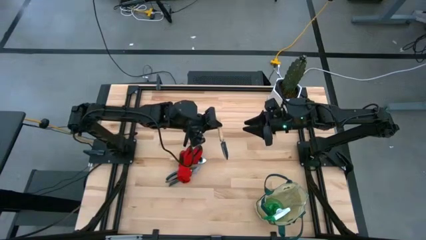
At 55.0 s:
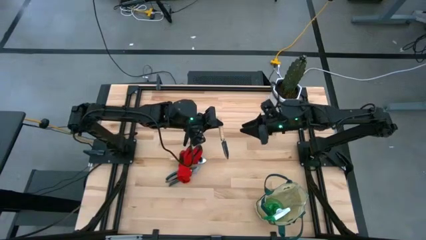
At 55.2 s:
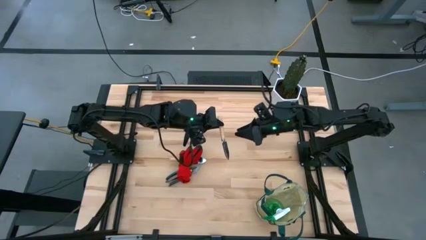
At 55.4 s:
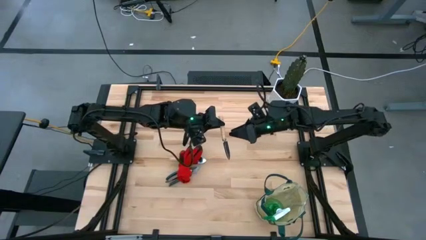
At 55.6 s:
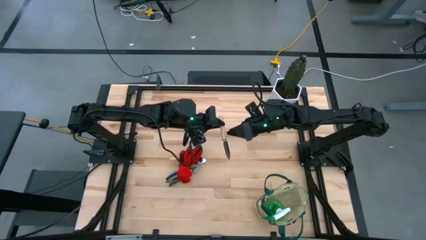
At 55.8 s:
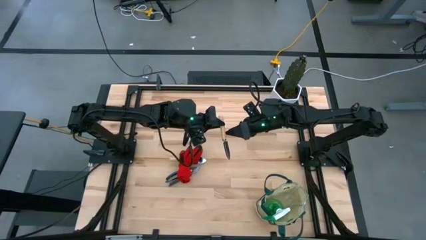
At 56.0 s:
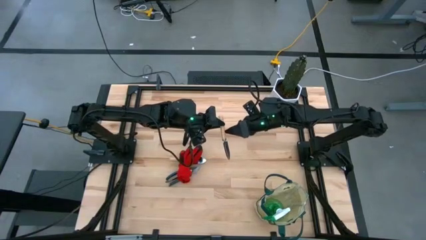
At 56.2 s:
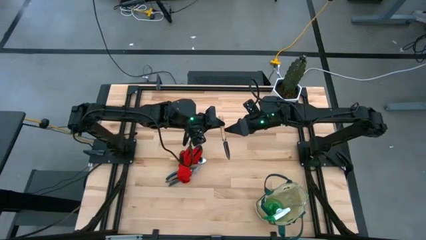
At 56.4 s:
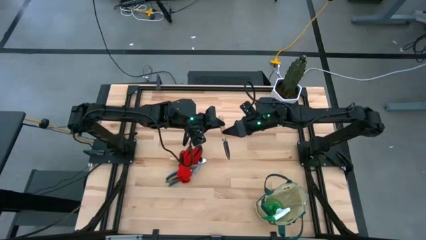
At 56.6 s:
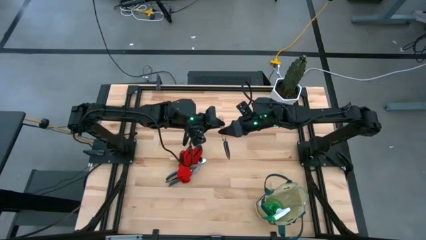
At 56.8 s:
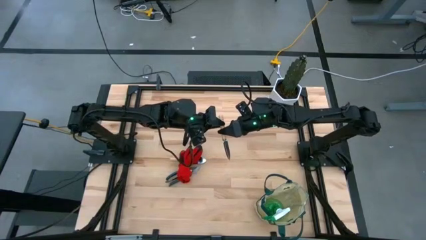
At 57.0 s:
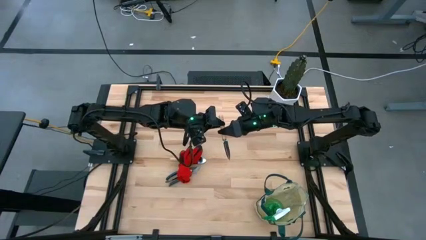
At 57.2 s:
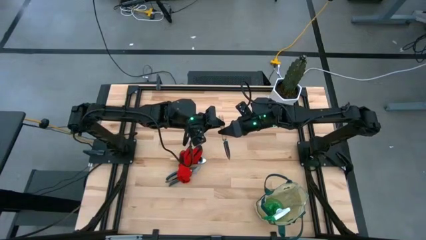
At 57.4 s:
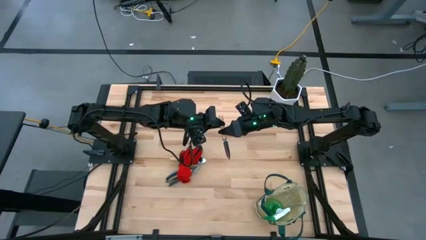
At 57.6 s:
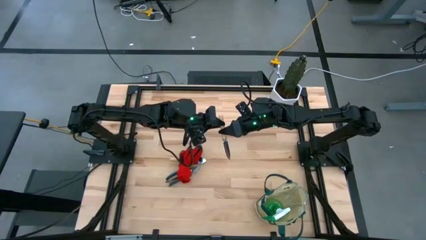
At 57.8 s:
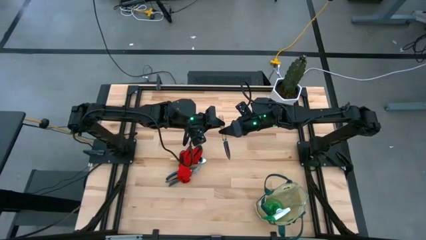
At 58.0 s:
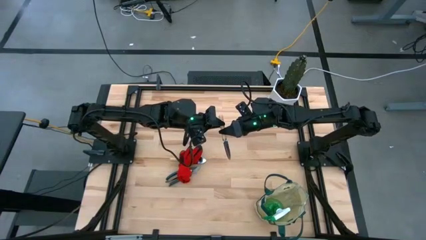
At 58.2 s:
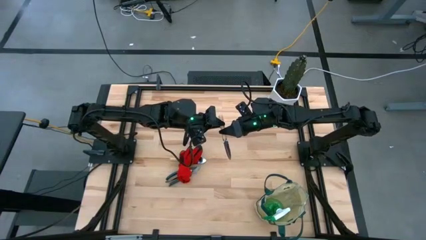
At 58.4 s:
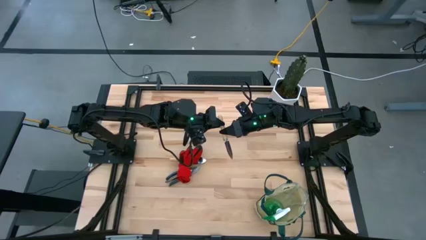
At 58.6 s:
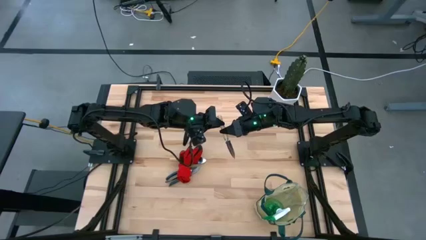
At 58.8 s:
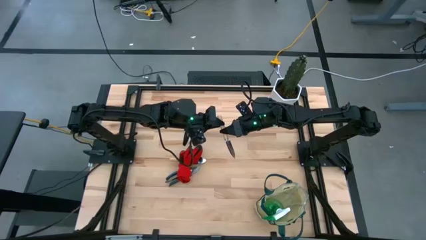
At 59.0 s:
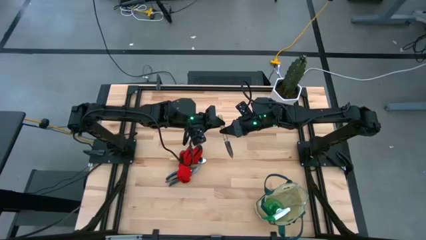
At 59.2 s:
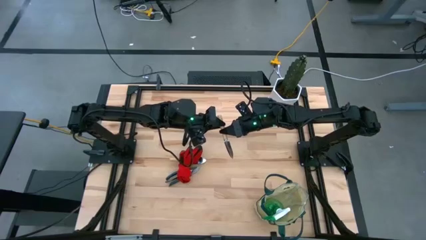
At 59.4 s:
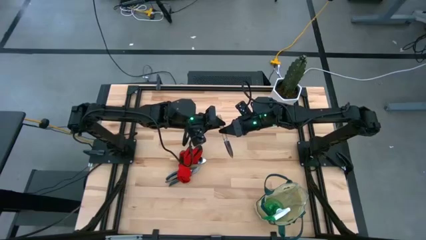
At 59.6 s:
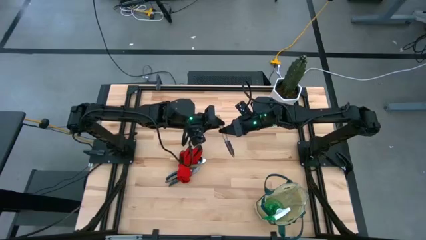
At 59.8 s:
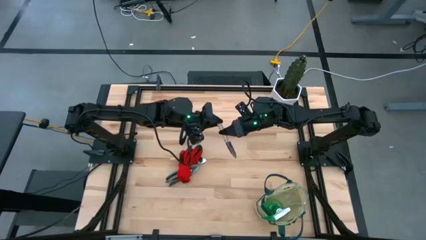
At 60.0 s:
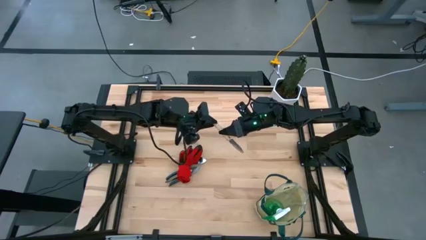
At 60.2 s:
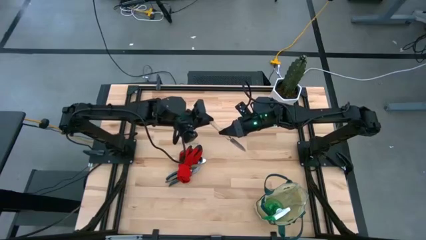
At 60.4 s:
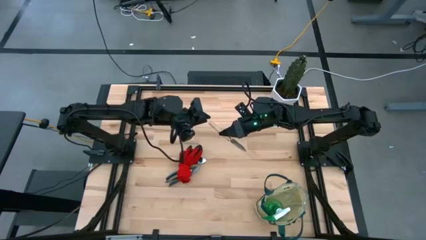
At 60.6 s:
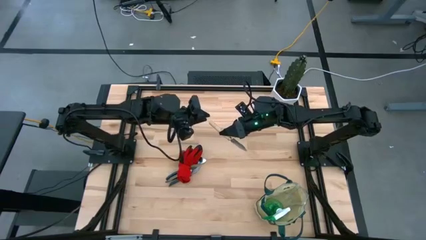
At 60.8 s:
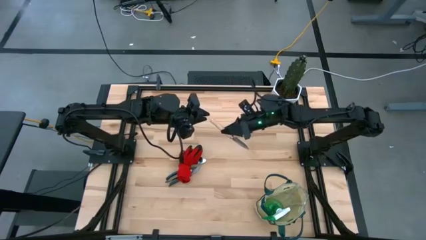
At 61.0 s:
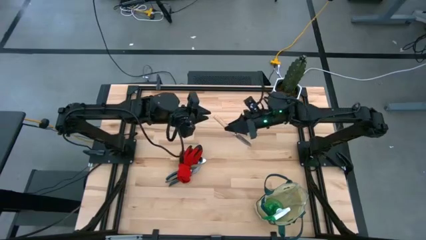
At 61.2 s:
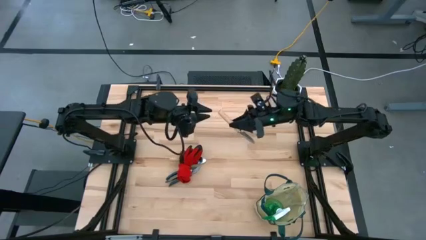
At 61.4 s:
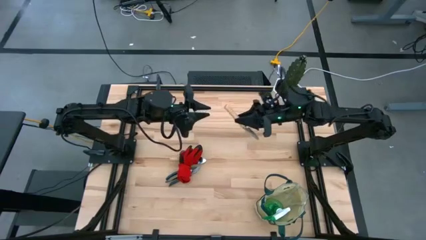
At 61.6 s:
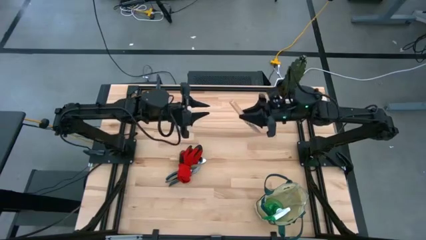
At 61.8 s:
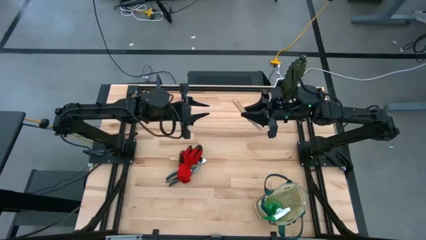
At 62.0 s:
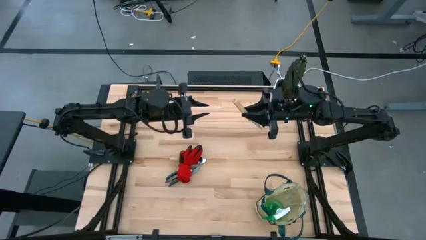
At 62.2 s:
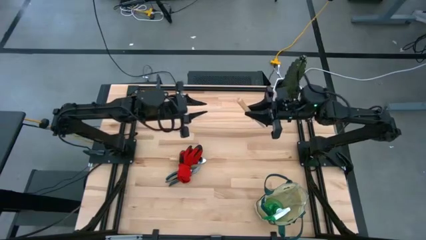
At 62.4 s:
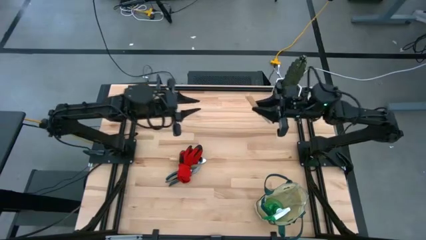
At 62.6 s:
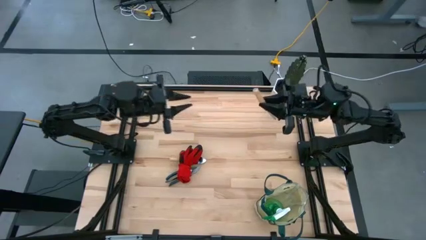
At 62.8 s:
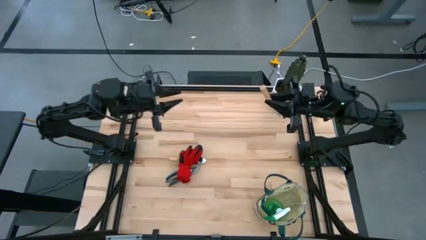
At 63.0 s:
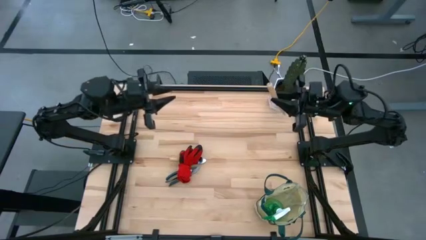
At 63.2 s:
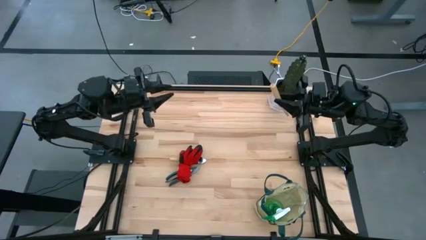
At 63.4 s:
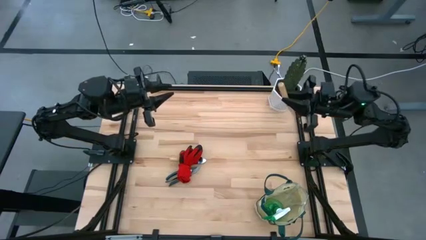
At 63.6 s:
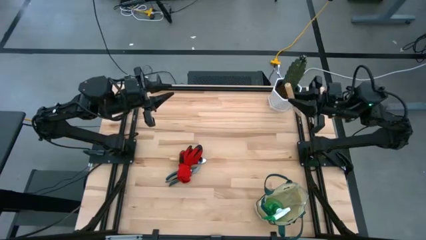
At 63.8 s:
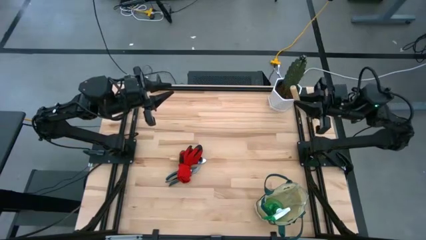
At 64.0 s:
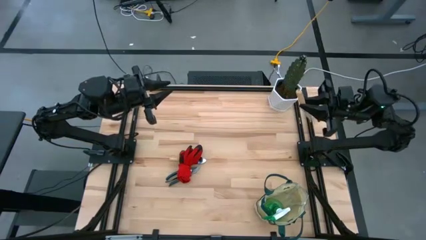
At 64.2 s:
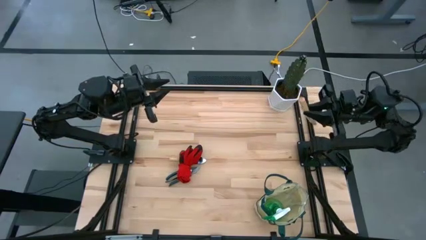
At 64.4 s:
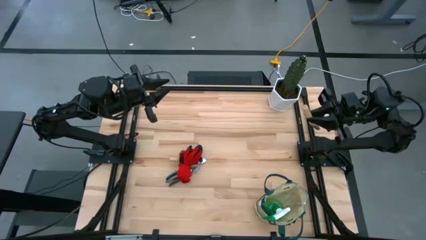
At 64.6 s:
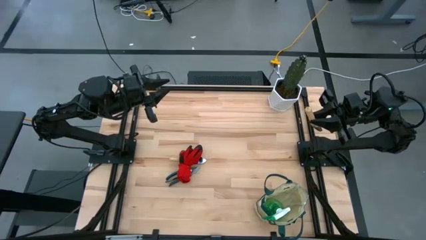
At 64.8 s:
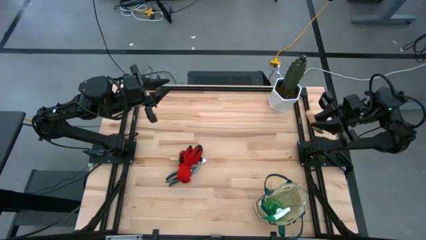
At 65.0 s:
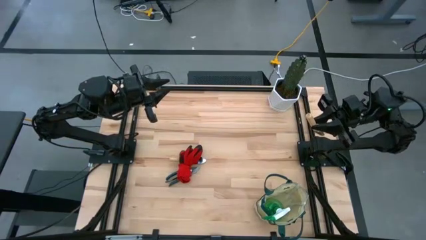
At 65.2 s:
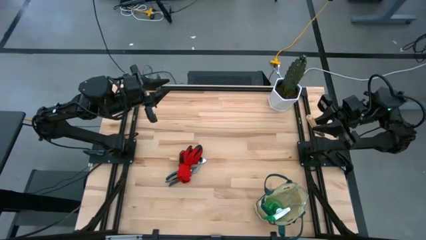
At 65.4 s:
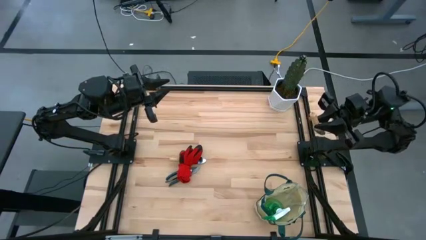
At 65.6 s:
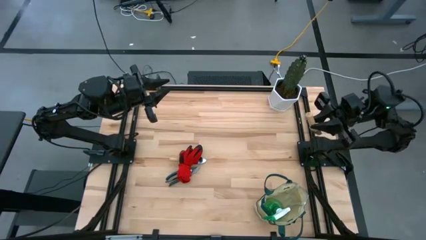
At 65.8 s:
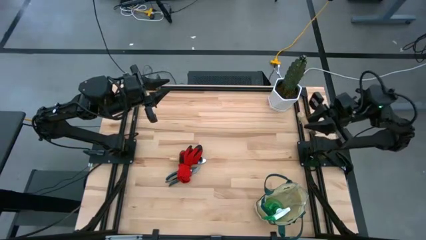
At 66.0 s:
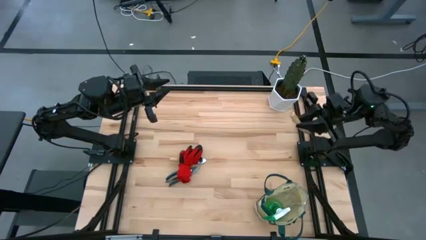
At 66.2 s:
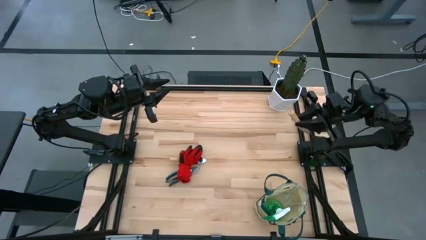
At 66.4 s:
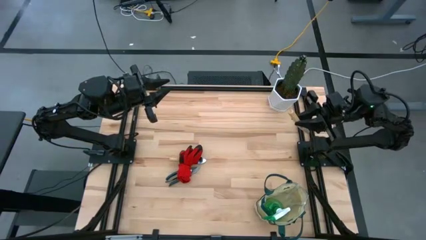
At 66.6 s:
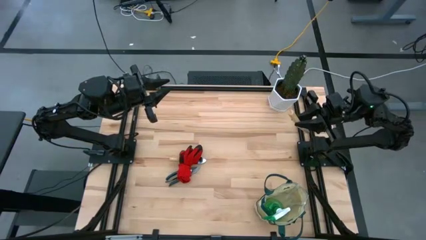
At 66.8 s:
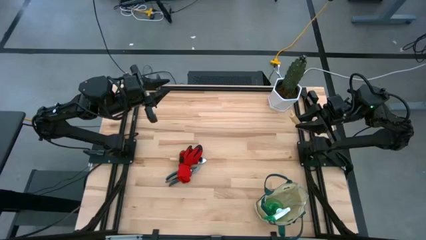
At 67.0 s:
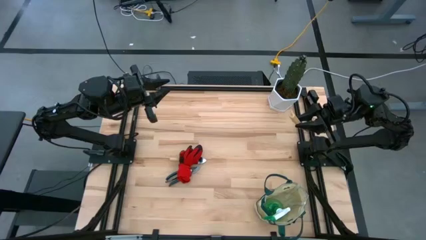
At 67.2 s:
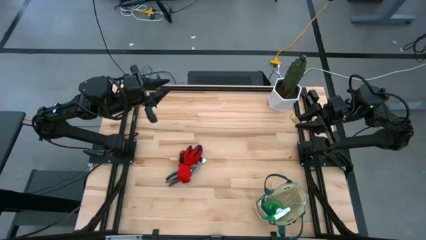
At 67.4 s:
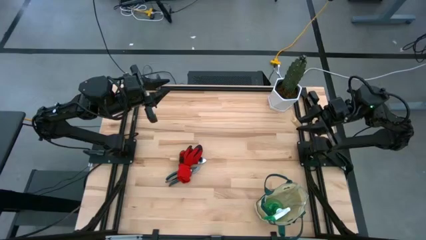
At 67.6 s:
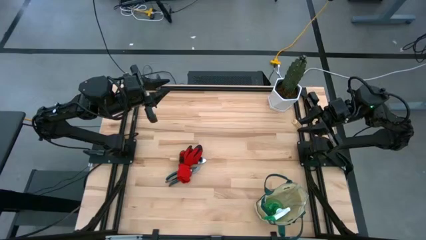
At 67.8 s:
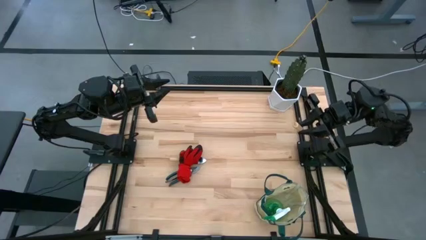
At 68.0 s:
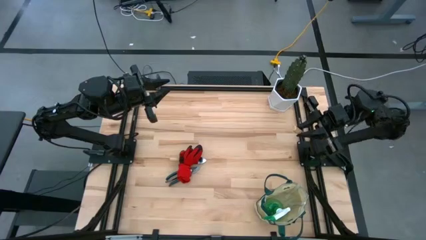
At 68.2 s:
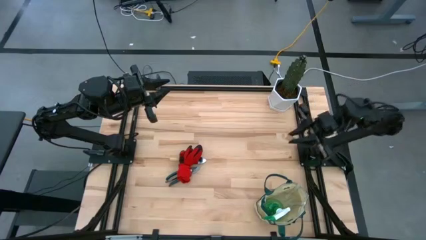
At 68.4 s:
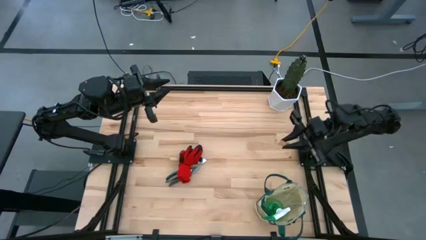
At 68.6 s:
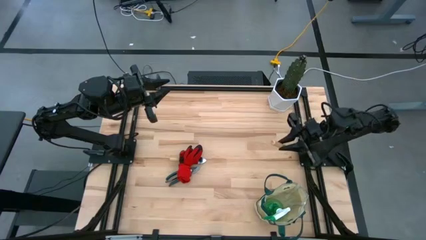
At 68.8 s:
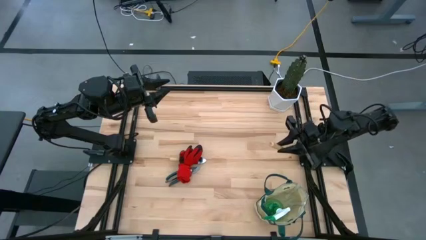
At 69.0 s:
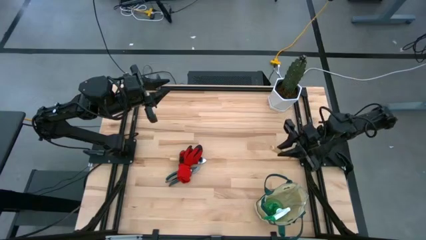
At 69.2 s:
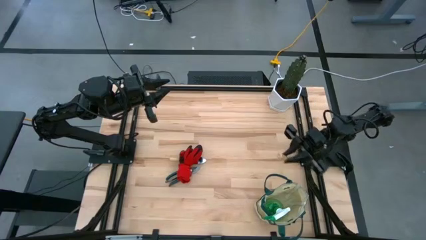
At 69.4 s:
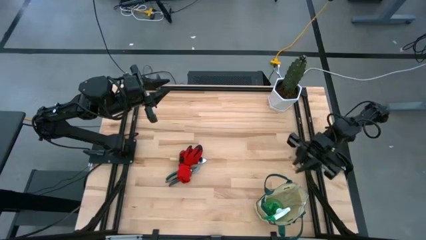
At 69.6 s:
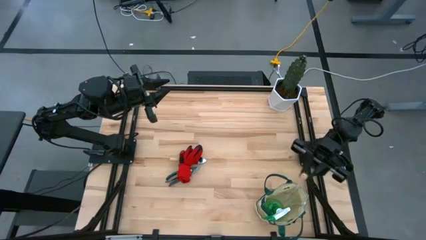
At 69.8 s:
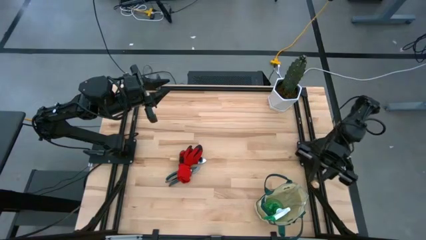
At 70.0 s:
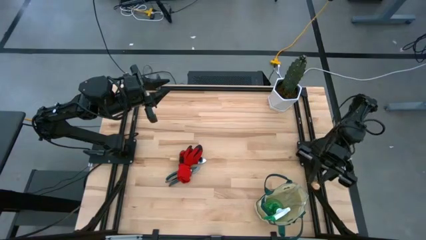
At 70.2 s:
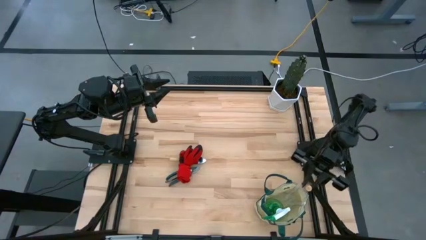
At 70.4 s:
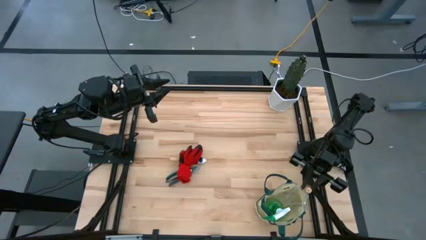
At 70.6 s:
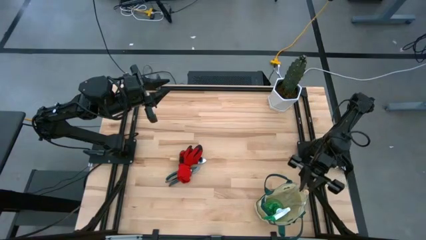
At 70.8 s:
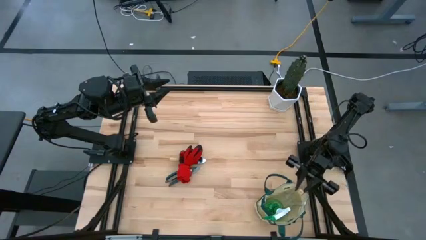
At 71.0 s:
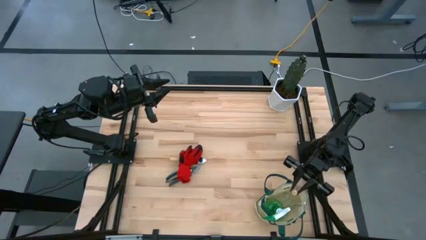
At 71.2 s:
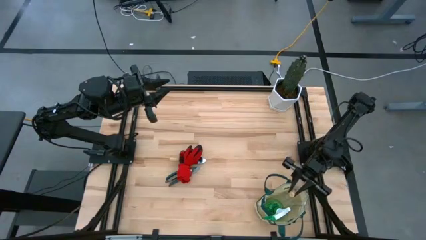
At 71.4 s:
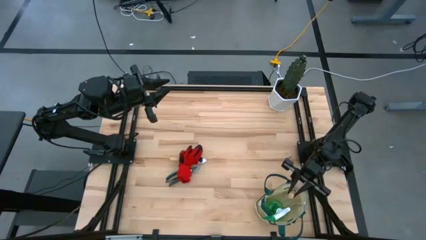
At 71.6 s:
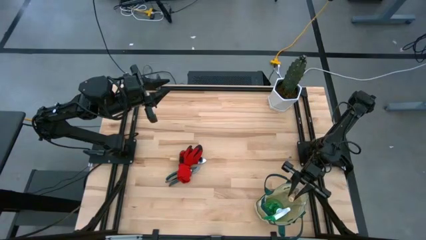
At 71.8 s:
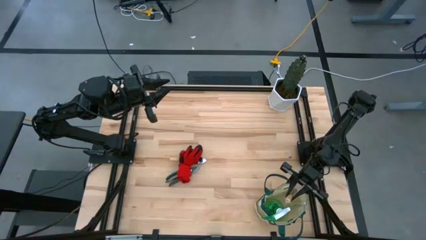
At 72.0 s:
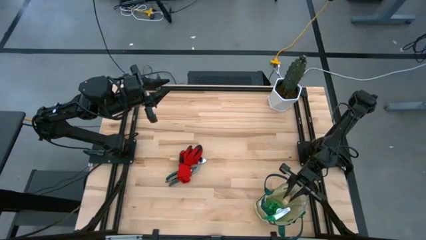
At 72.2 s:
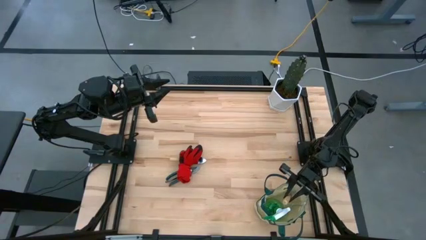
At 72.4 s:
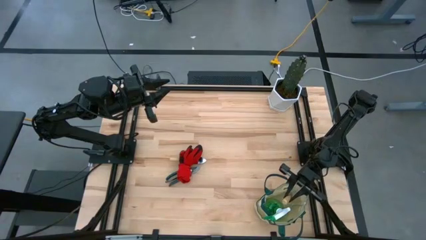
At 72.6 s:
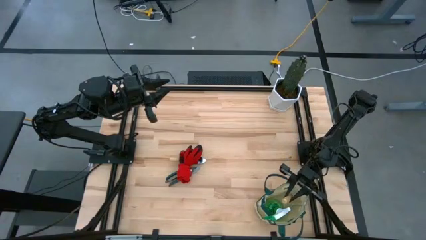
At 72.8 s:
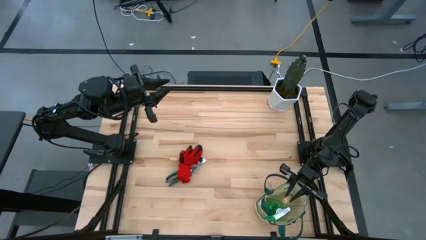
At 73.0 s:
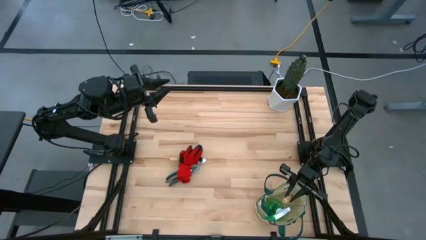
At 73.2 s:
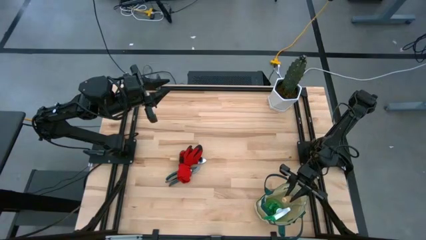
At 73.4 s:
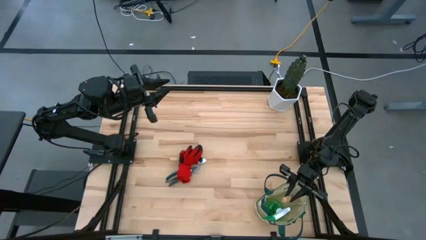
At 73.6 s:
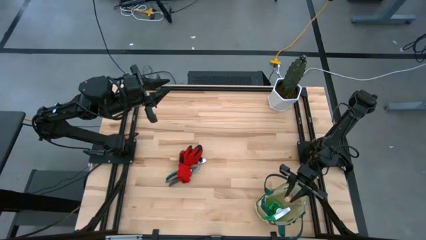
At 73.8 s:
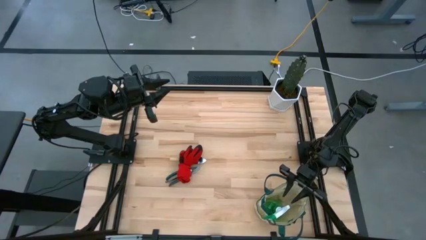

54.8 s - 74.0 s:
Task: Pick & Place Garden tools in Gardening bag
Put the light brown trowel into the gardening tool bag
